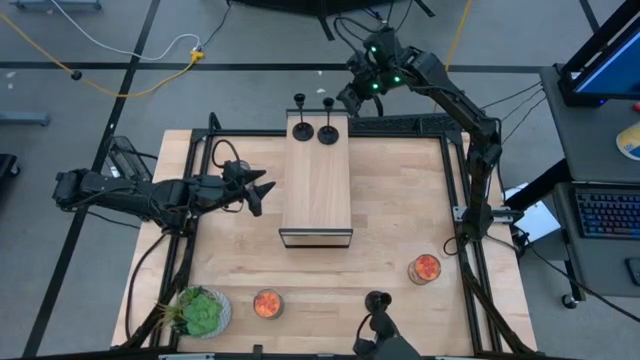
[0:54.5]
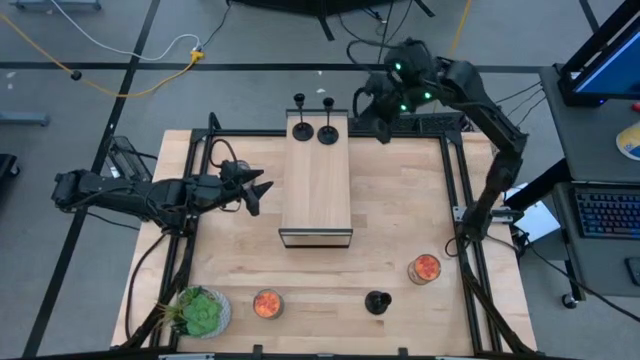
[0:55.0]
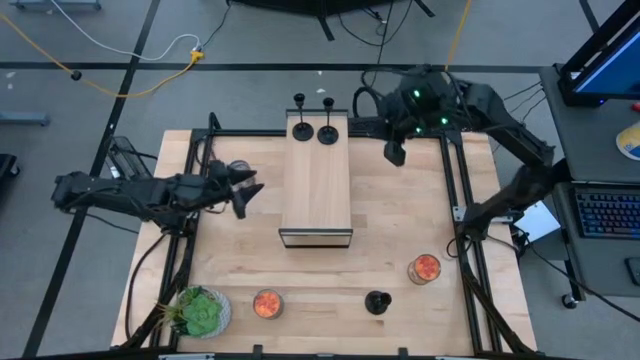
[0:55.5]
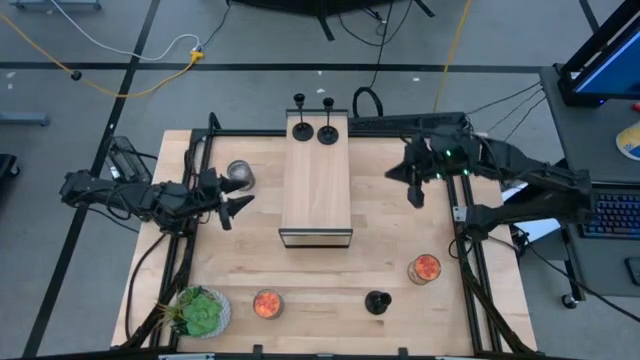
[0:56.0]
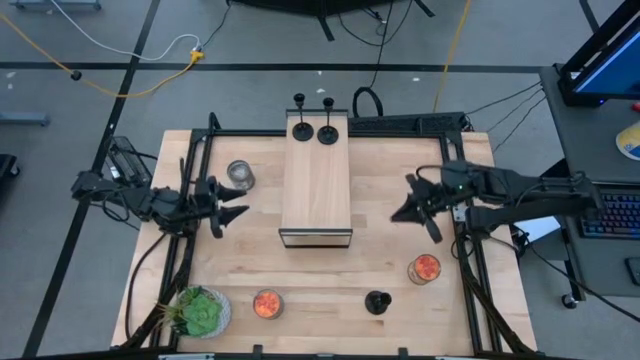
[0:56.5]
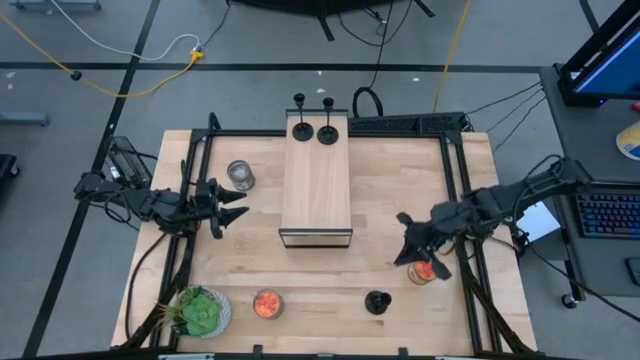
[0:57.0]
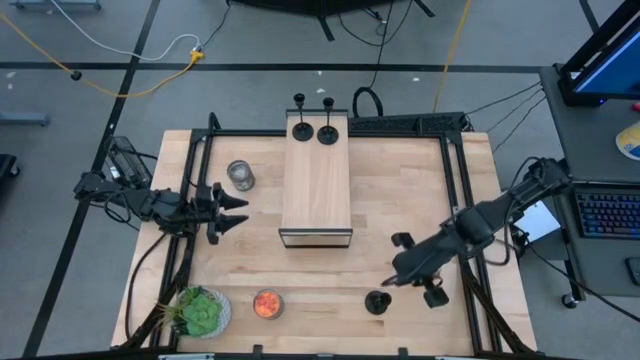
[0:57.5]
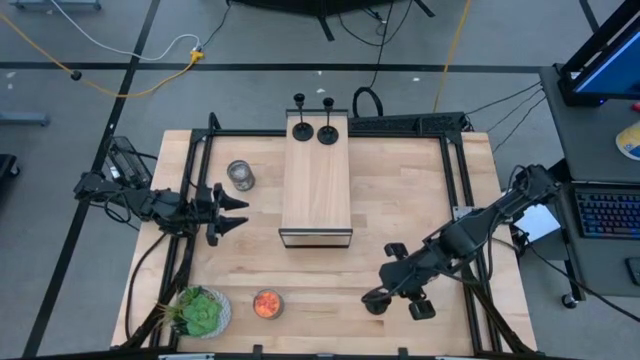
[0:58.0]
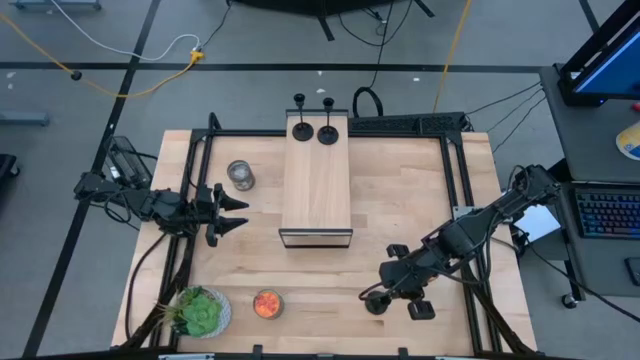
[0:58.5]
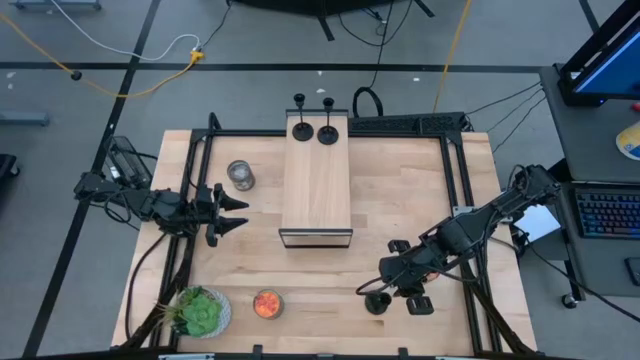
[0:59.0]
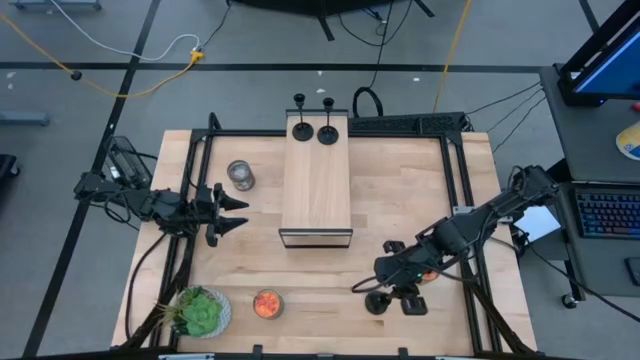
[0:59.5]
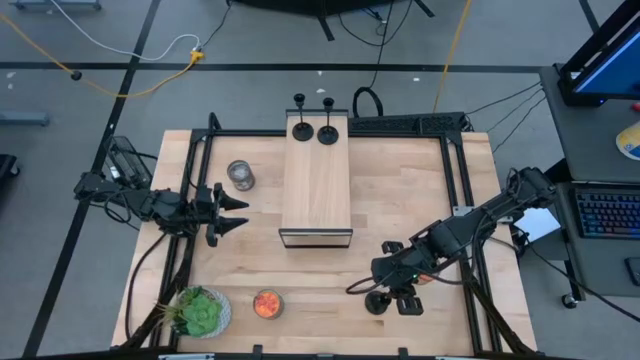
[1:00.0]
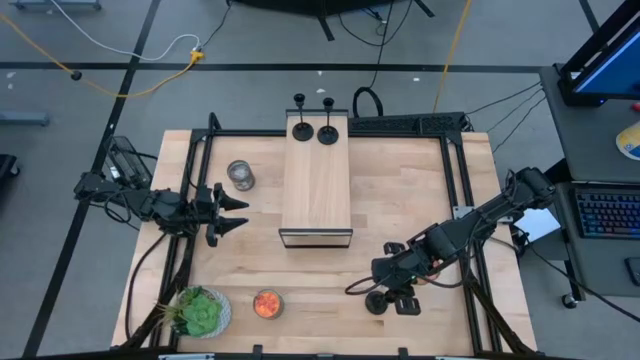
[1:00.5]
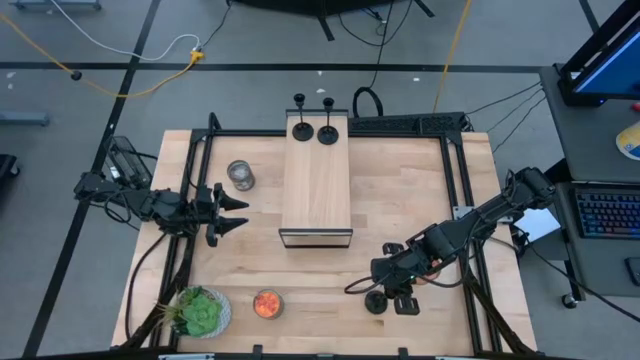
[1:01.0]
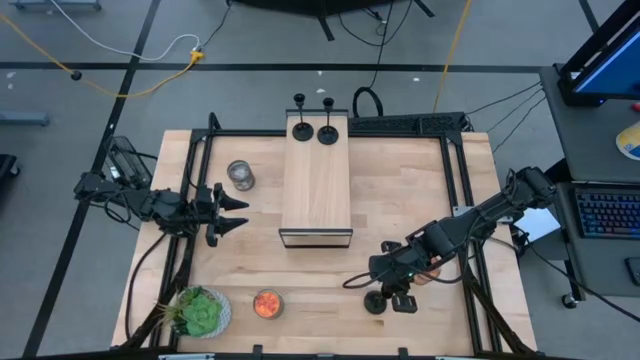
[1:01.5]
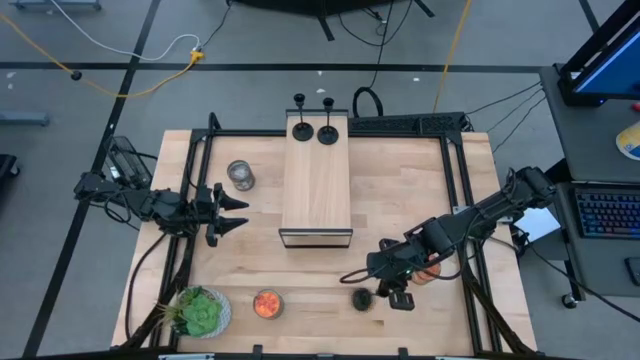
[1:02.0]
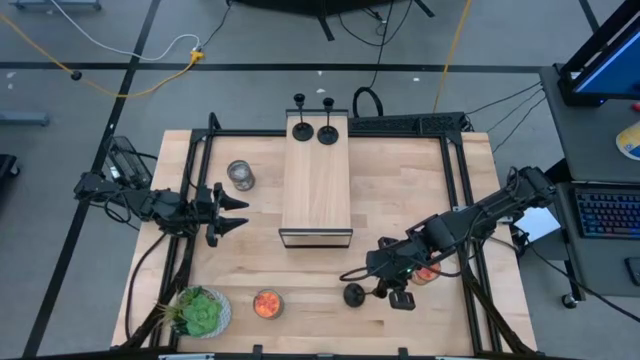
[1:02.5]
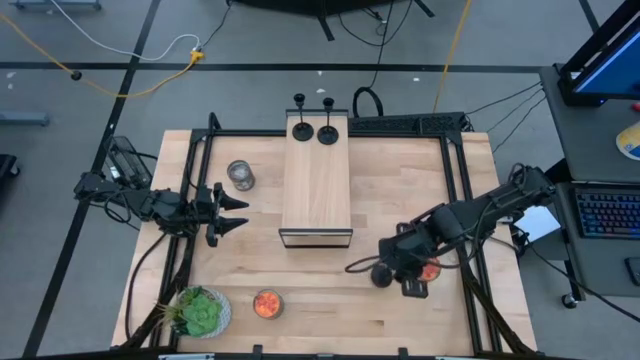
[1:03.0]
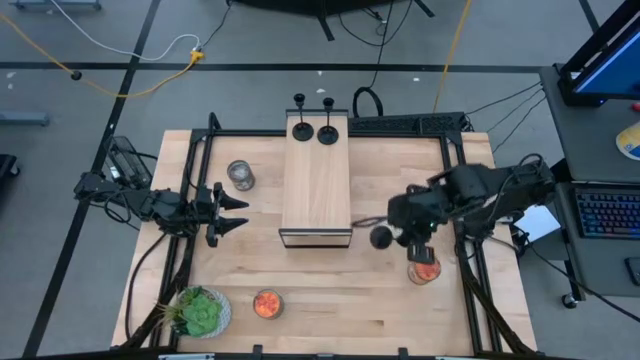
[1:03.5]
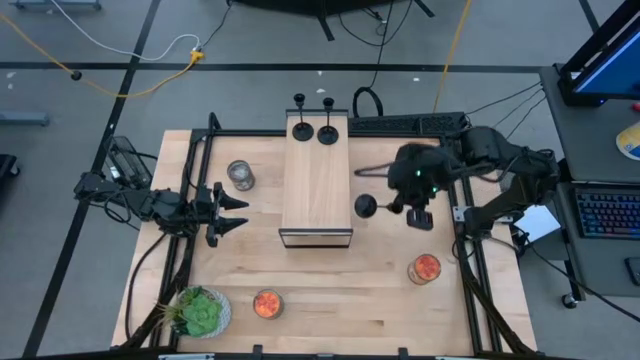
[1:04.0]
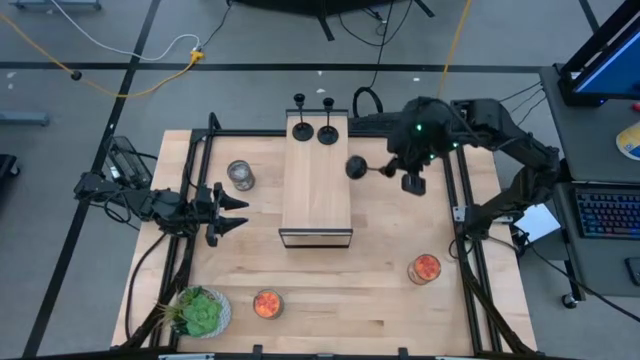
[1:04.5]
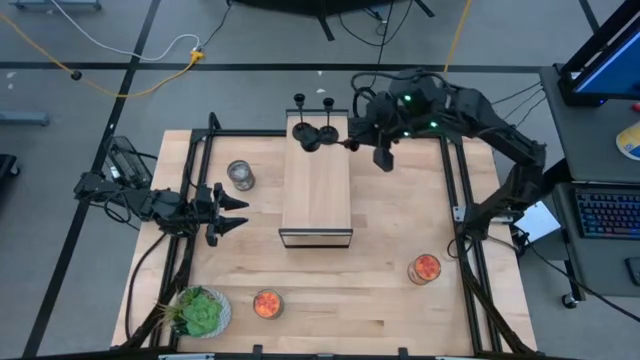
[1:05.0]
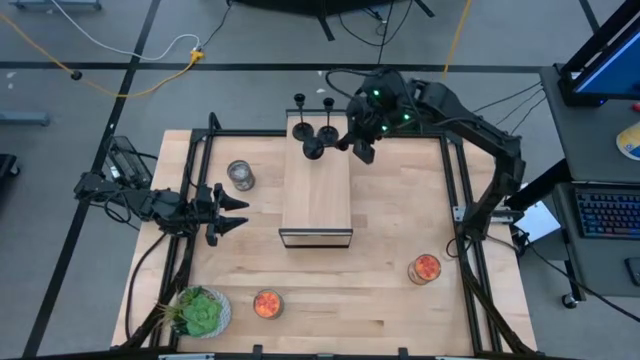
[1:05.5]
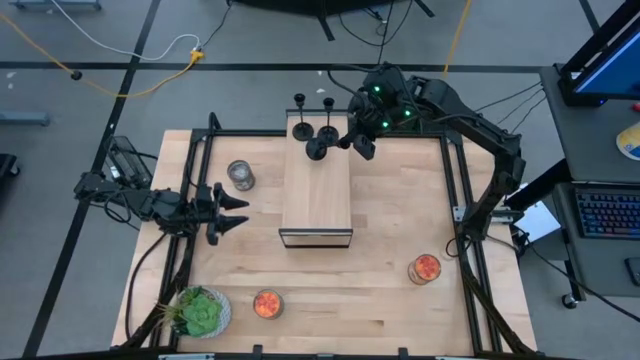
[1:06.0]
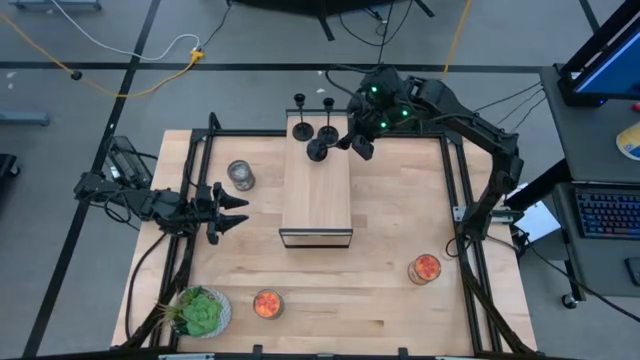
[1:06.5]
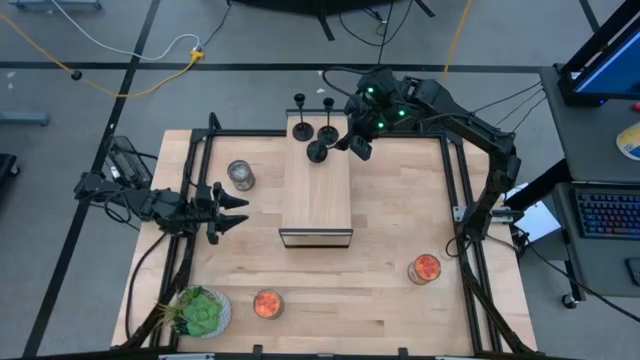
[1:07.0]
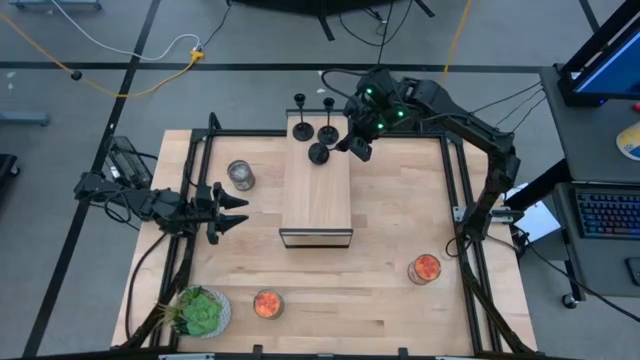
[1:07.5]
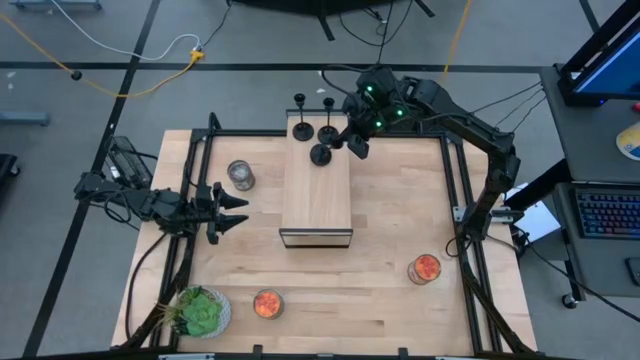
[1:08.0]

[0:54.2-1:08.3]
Task: Pick & Place candle stick holders
Put the black candle holder on the shelf

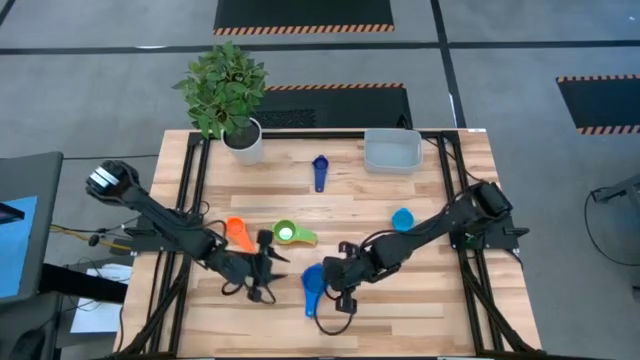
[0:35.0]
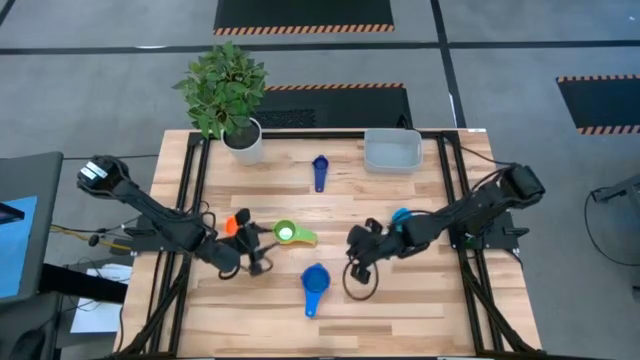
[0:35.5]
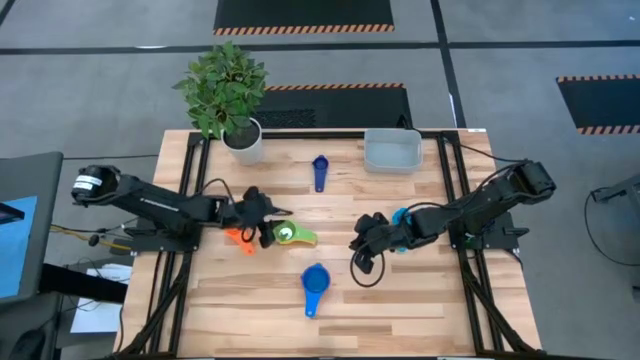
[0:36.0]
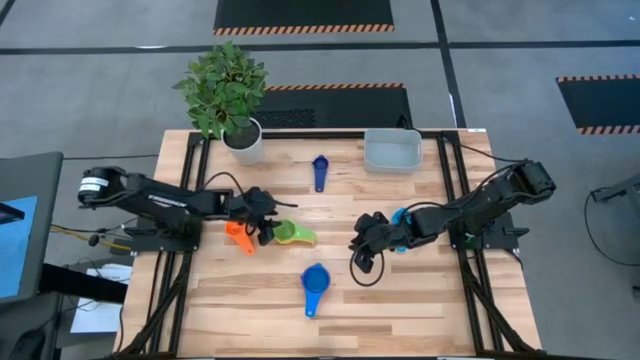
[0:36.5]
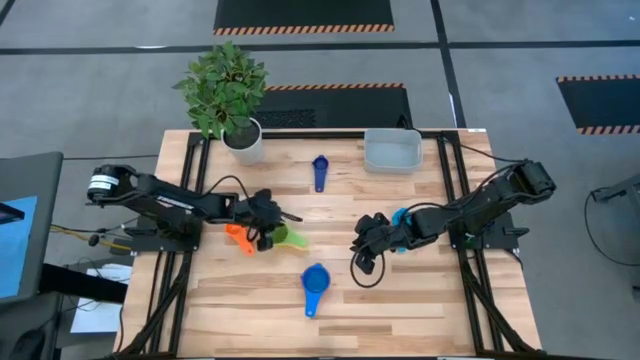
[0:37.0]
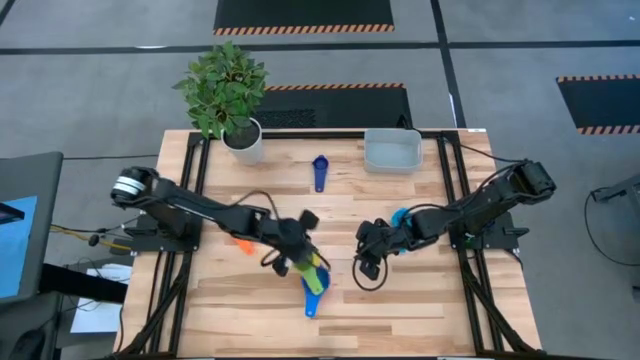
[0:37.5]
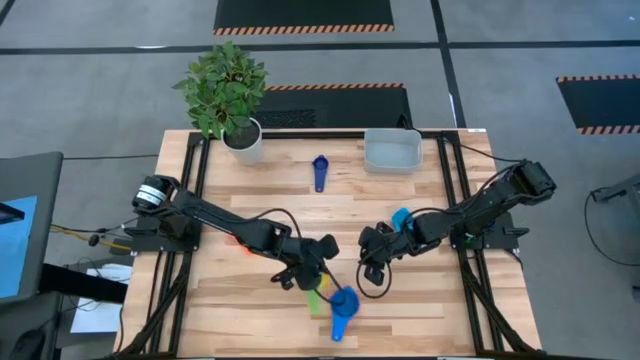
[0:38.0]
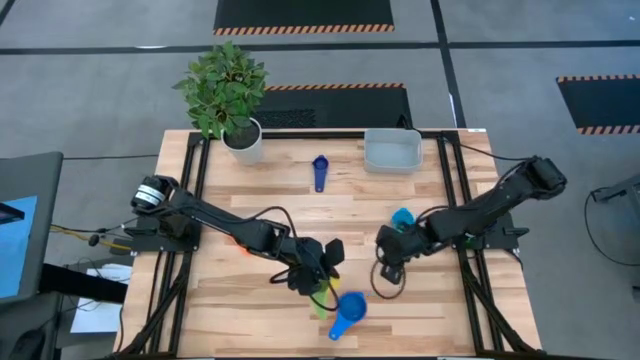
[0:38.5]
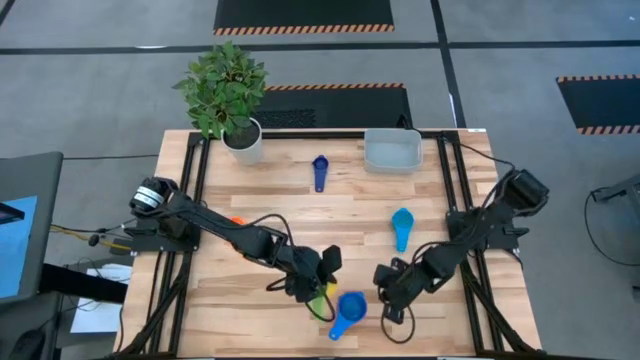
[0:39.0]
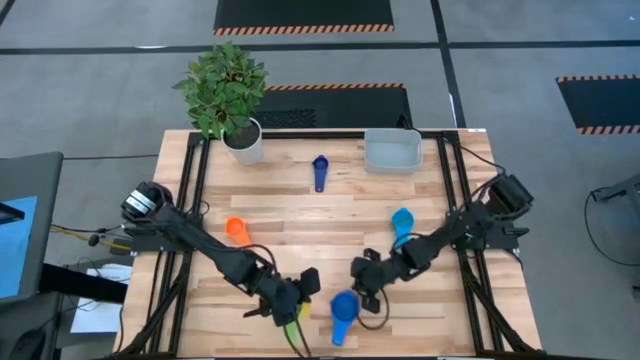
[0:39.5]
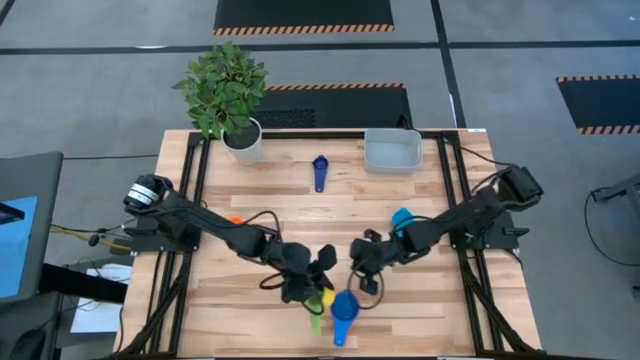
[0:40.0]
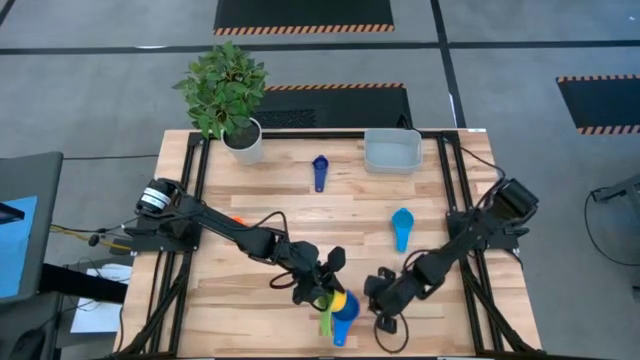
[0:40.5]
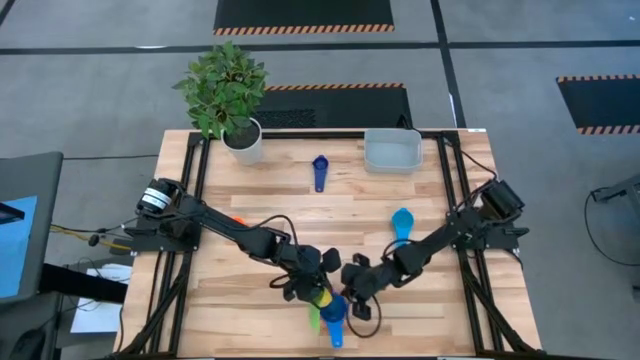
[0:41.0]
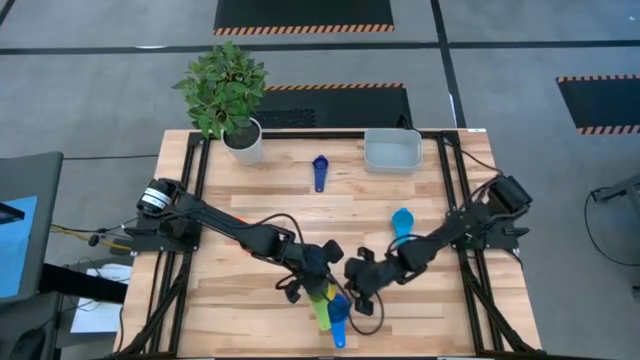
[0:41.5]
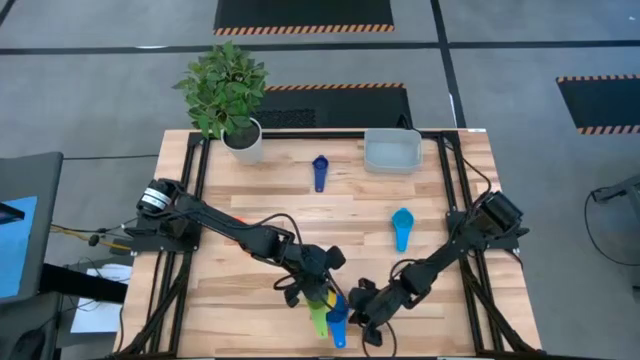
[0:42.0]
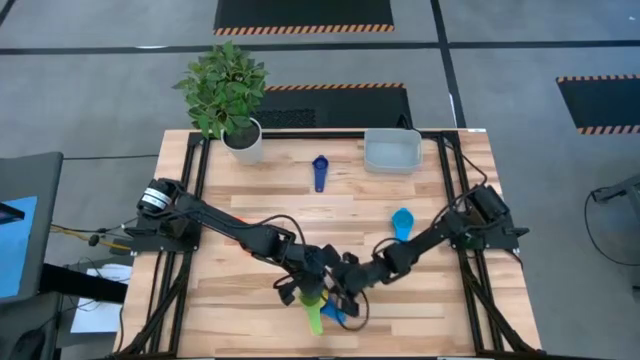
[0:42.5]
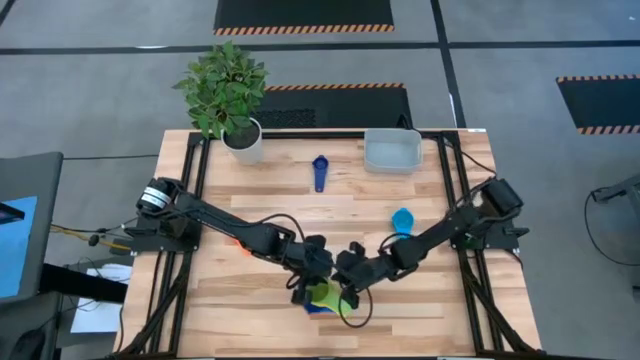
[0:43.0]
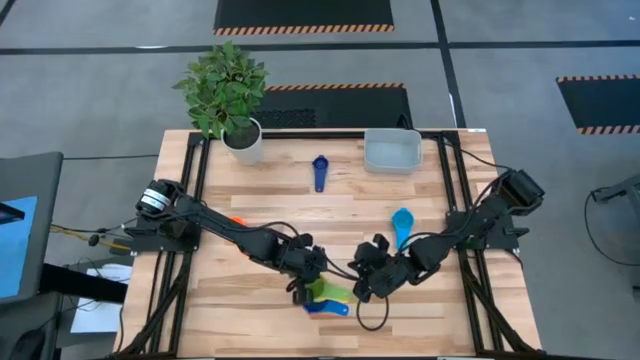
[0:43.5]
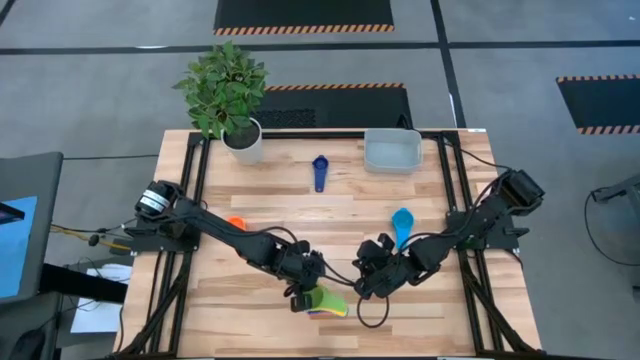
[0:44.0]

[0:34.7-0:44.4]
Task: Nest measuring cups in basket
Stack the stacked measuring cups on top of the other stacked measuring cups
